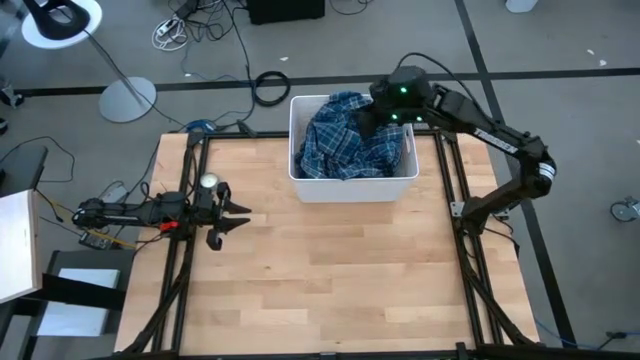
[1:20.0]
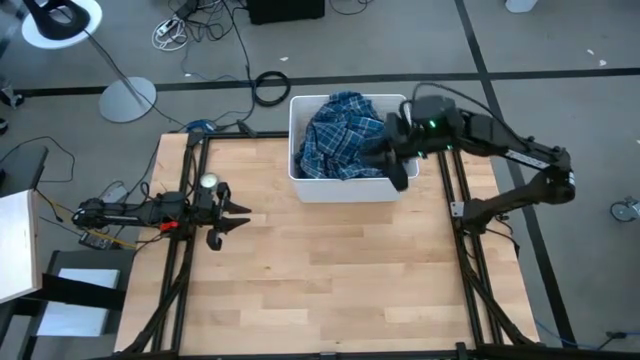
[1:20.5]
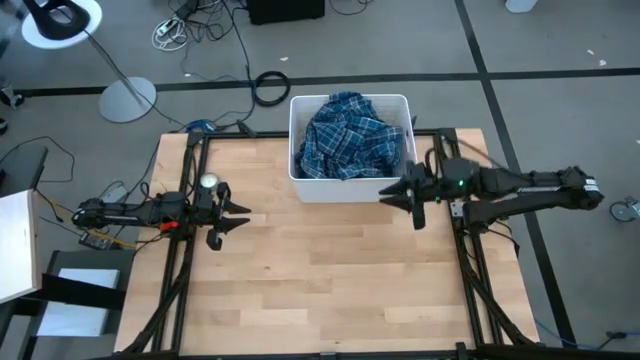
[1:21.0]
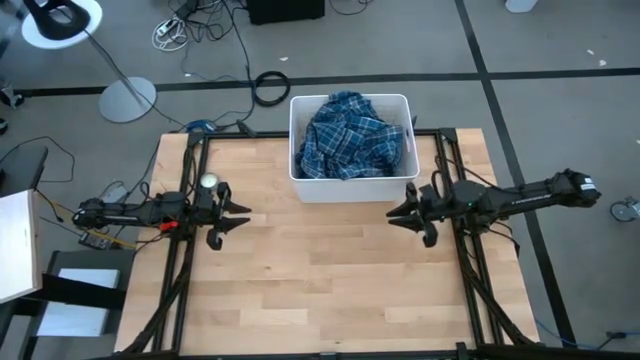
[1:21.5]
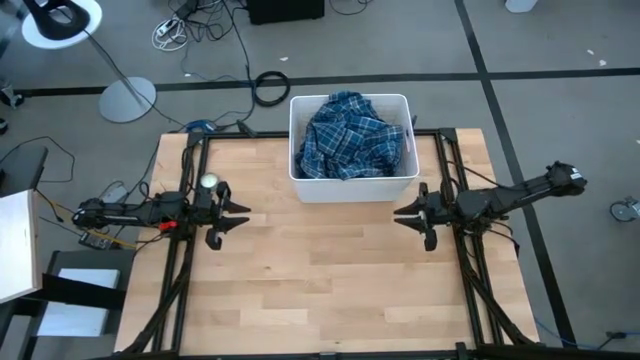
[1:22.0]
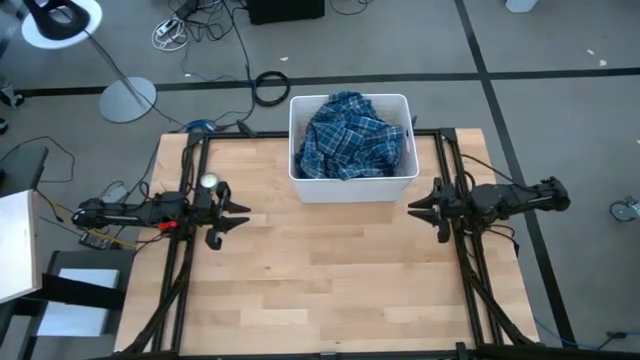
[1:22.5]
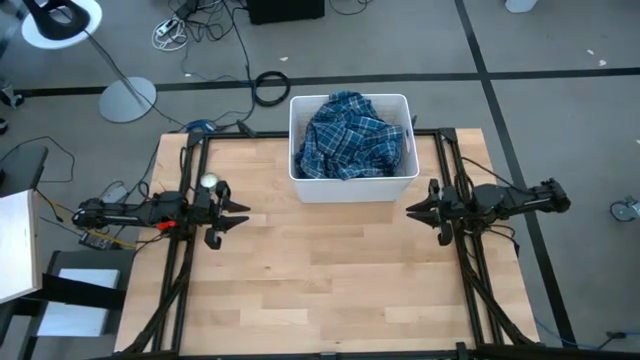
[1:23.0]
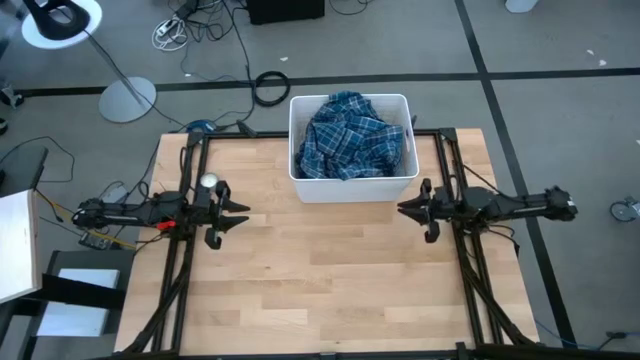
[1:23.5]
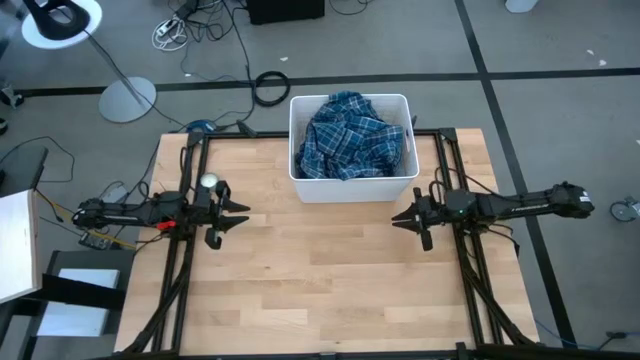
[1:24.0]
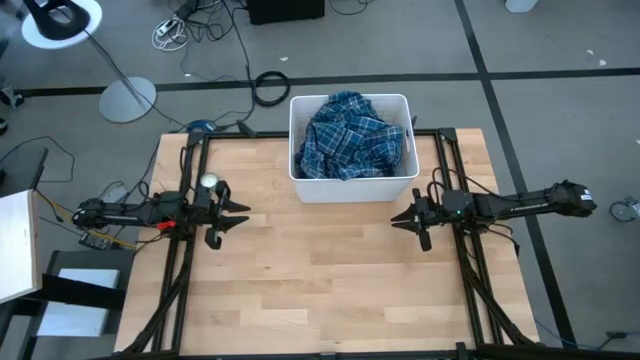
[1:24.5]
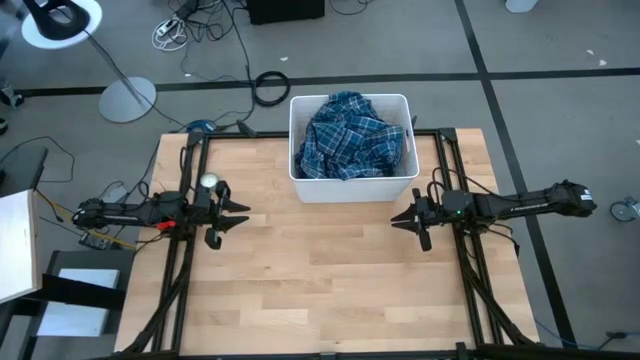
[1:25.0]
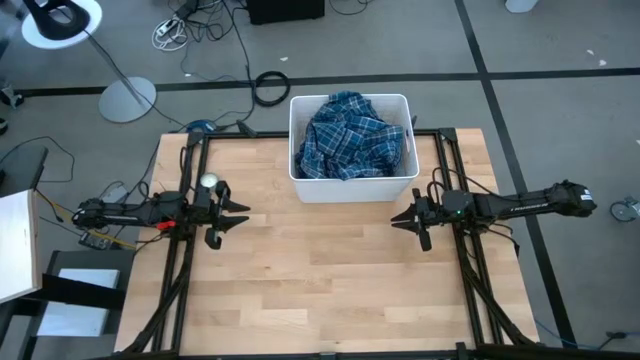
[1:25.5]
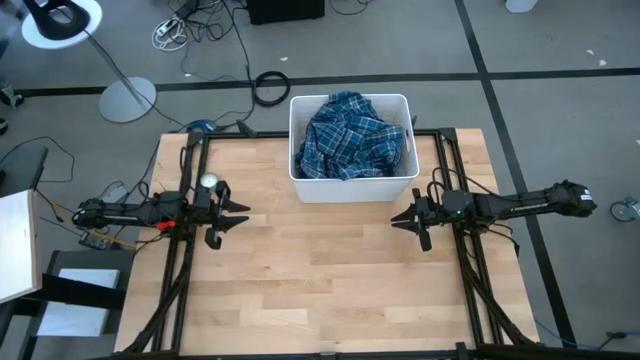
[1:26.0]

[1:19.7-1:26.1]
Task: Sort clothes
Return to Home Position

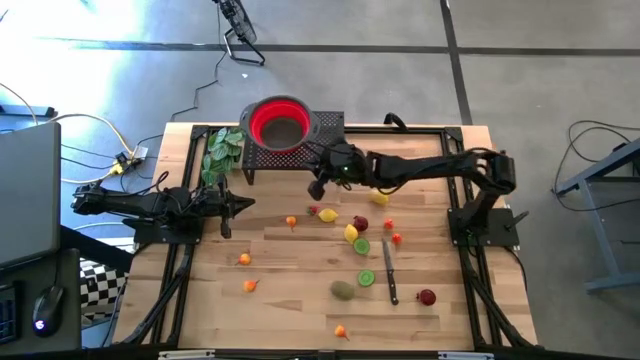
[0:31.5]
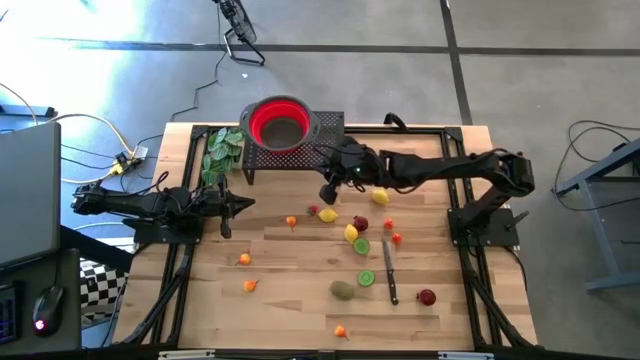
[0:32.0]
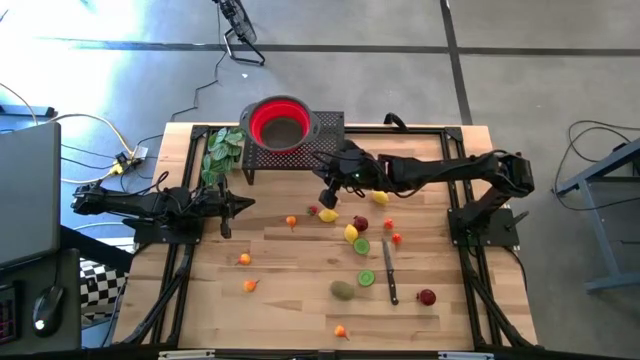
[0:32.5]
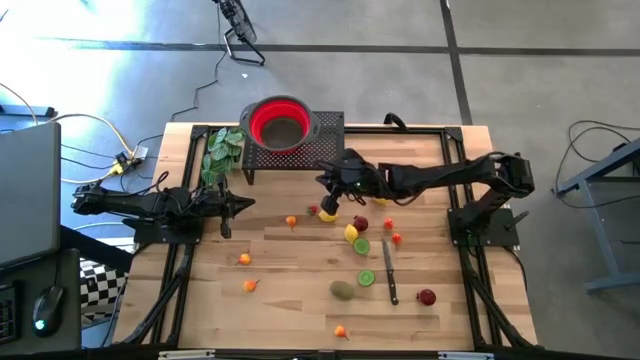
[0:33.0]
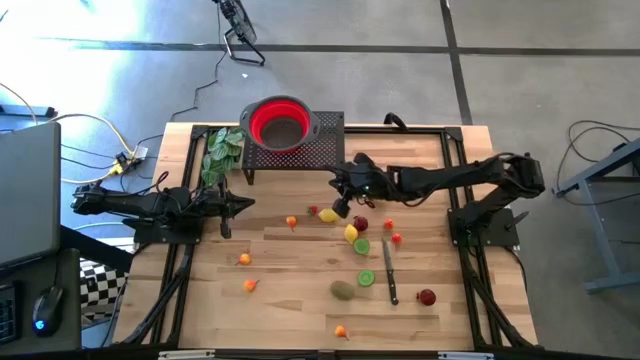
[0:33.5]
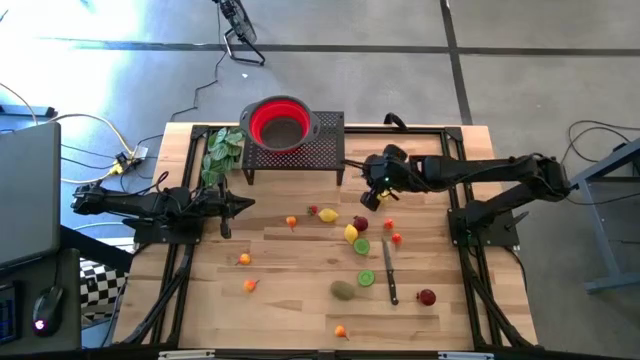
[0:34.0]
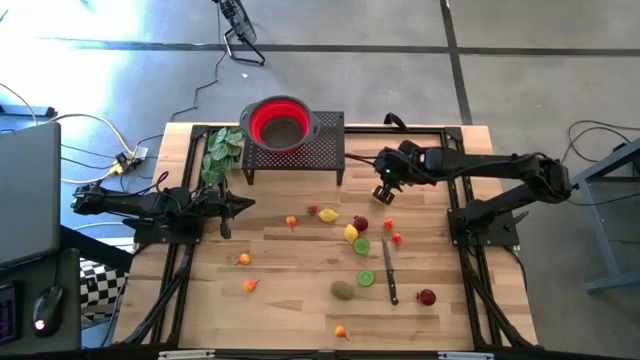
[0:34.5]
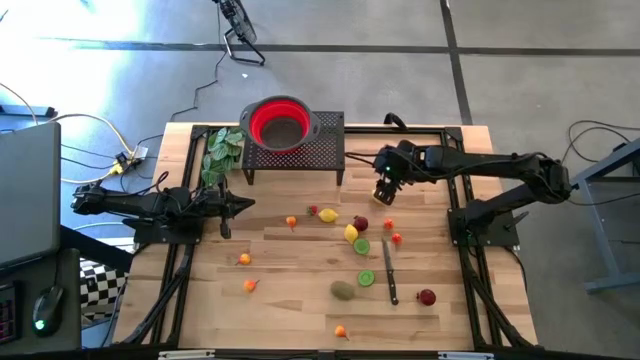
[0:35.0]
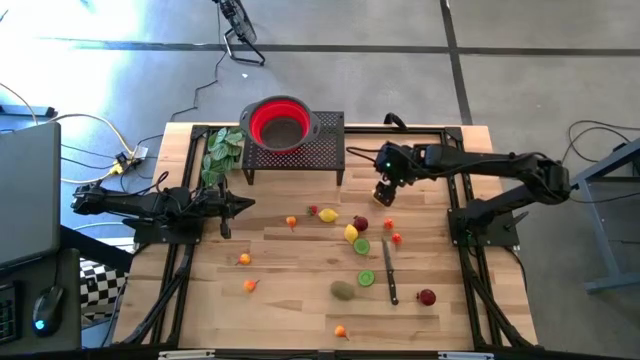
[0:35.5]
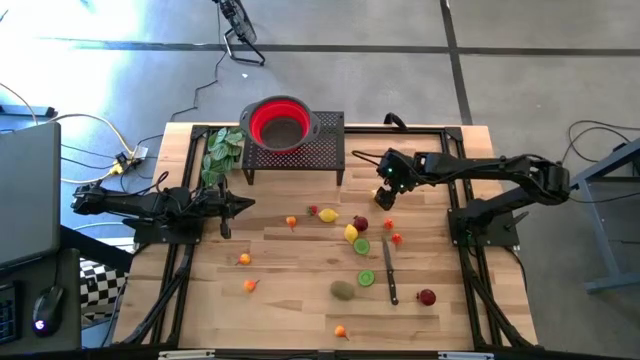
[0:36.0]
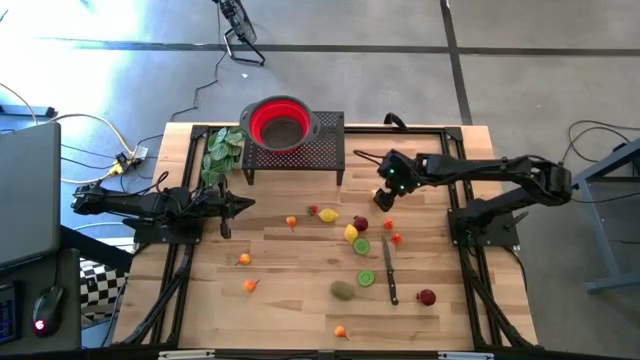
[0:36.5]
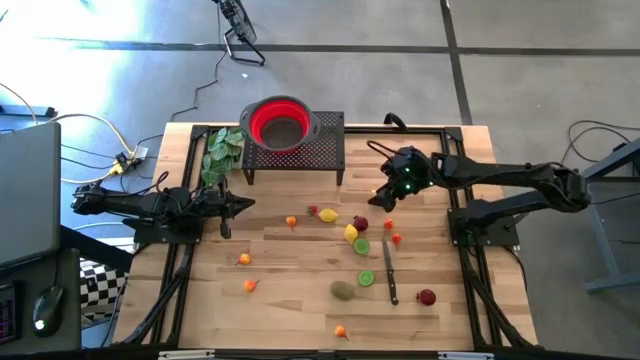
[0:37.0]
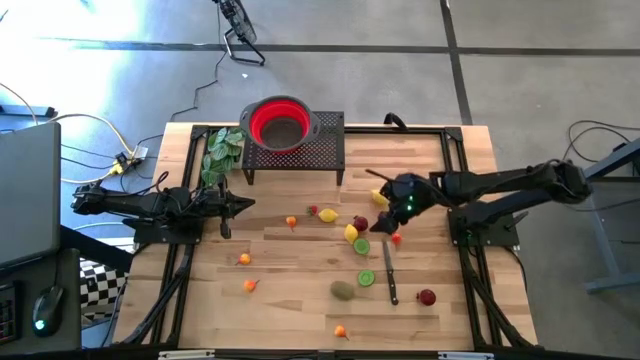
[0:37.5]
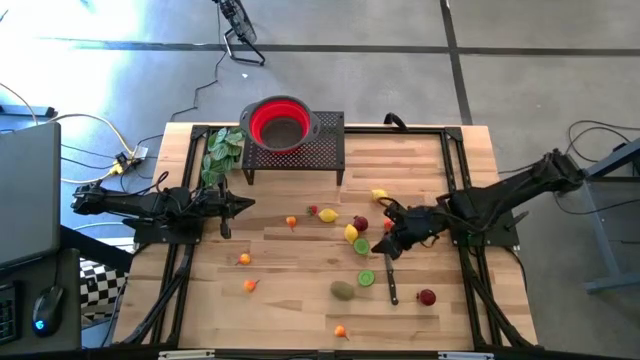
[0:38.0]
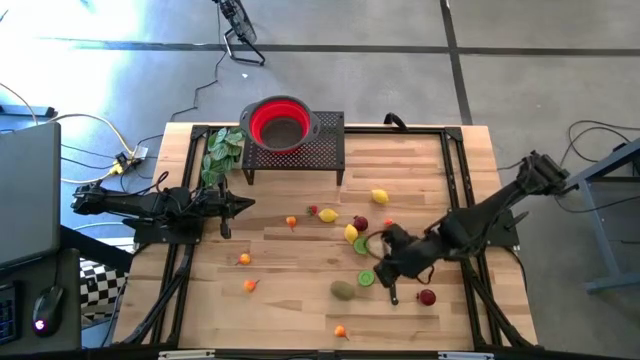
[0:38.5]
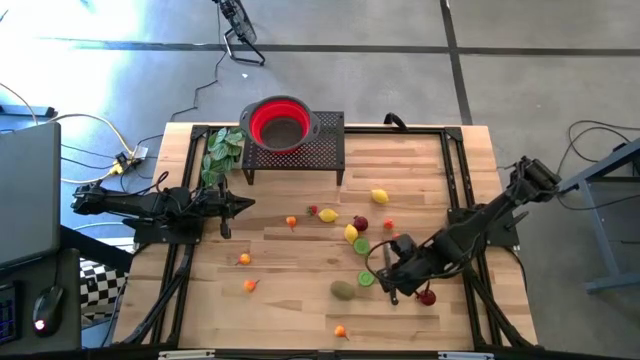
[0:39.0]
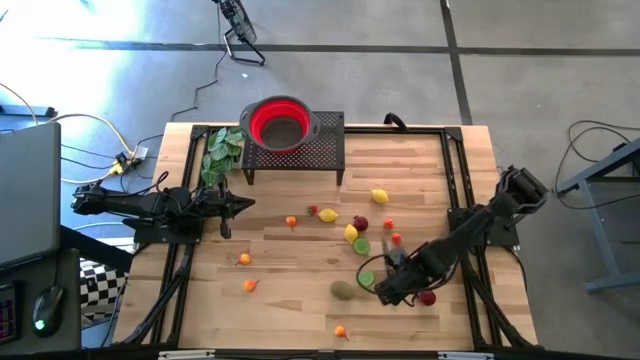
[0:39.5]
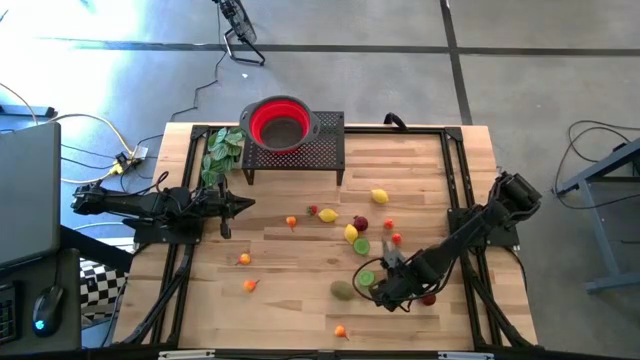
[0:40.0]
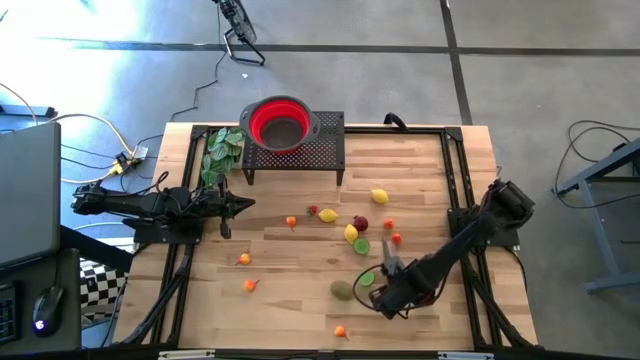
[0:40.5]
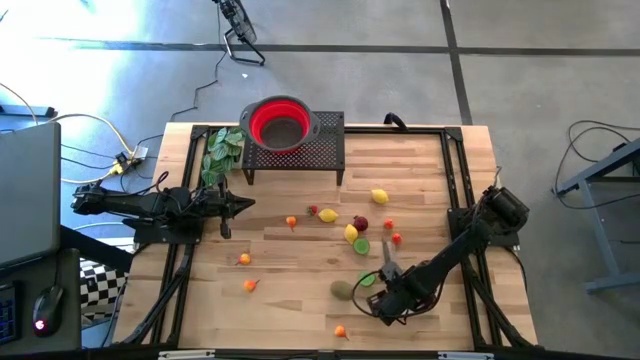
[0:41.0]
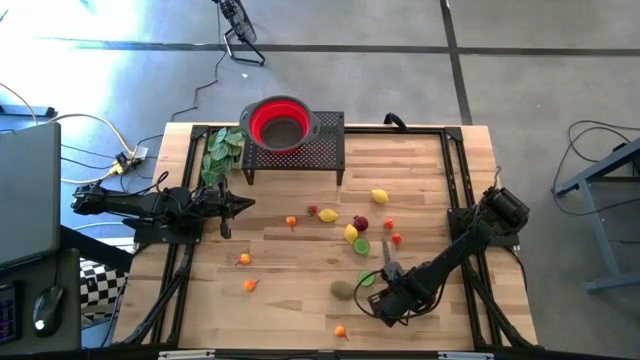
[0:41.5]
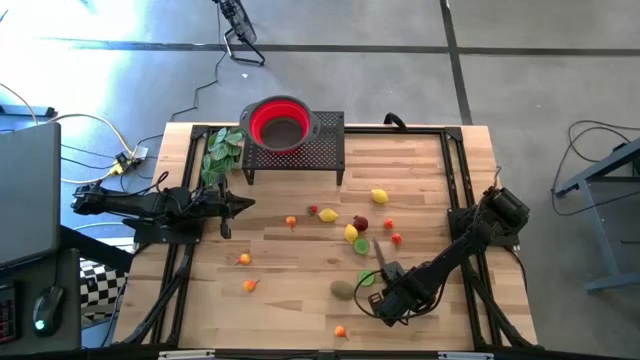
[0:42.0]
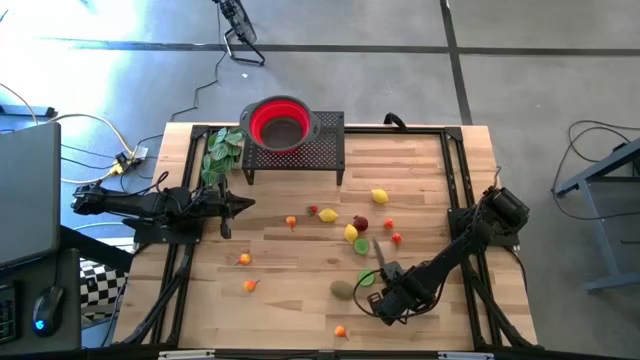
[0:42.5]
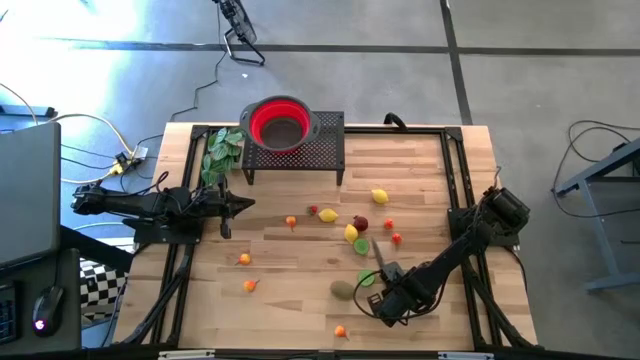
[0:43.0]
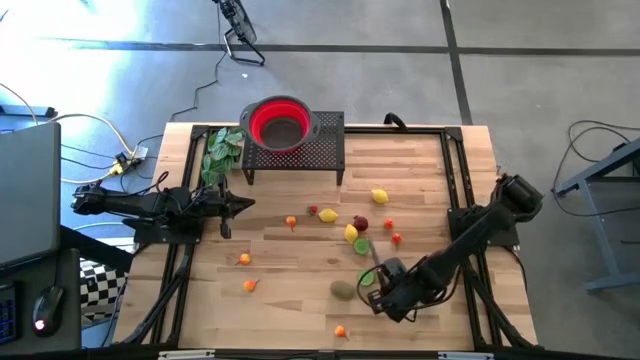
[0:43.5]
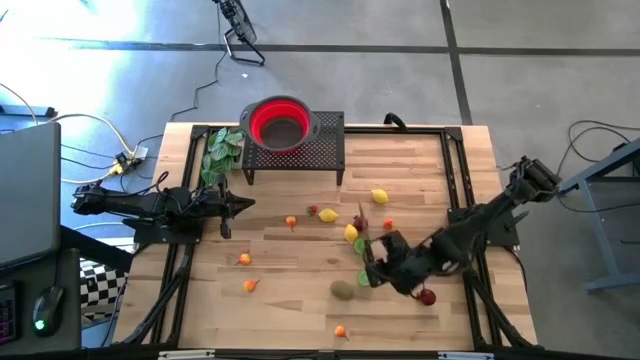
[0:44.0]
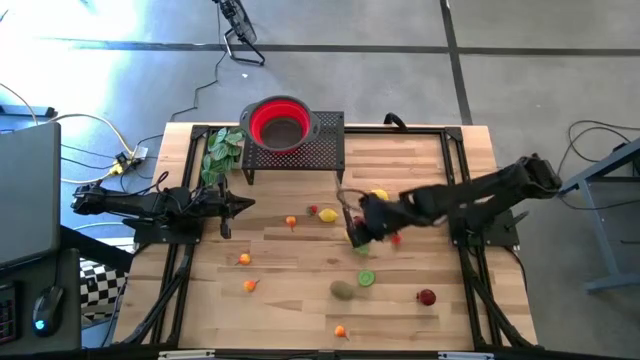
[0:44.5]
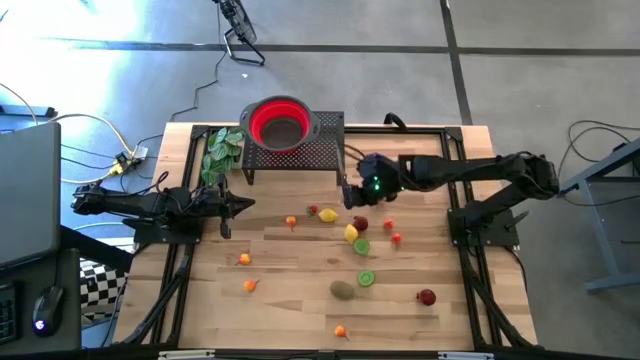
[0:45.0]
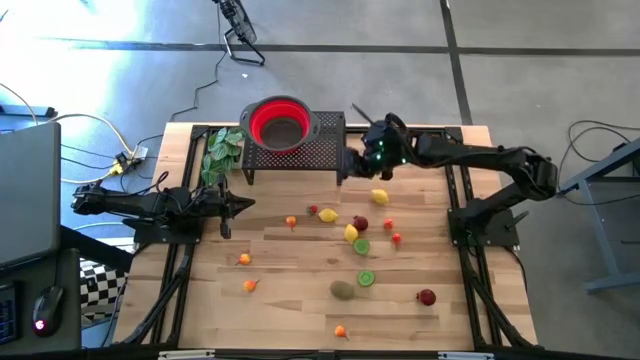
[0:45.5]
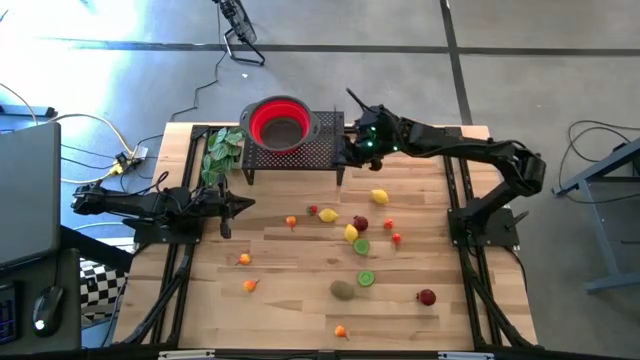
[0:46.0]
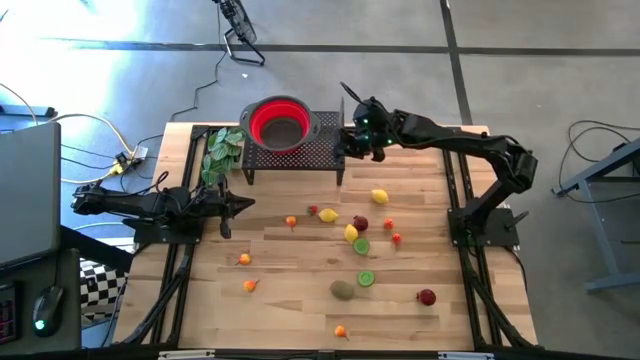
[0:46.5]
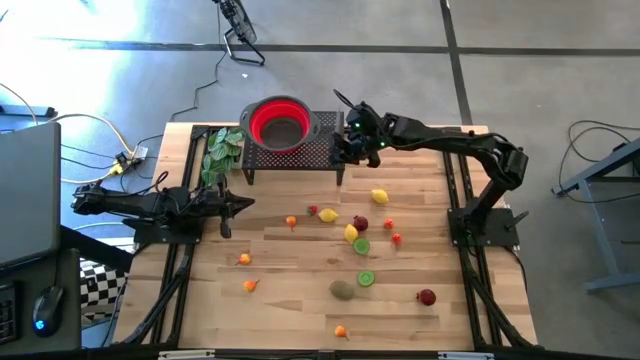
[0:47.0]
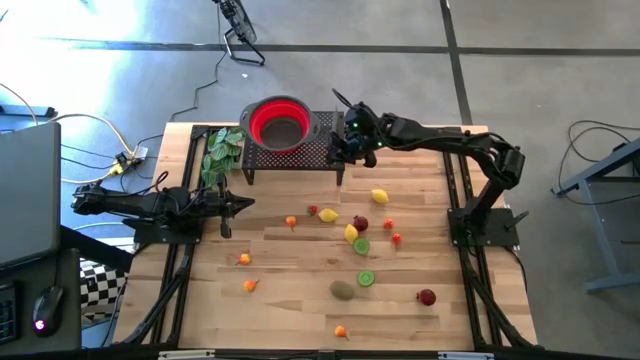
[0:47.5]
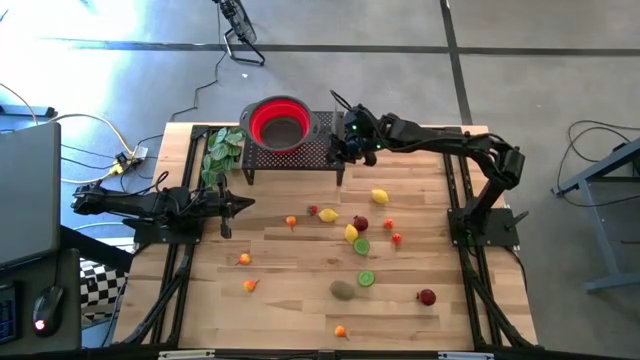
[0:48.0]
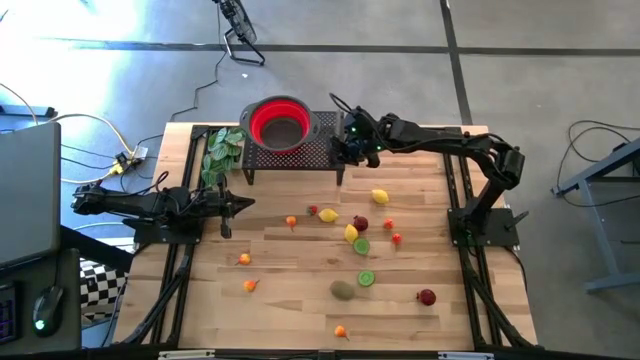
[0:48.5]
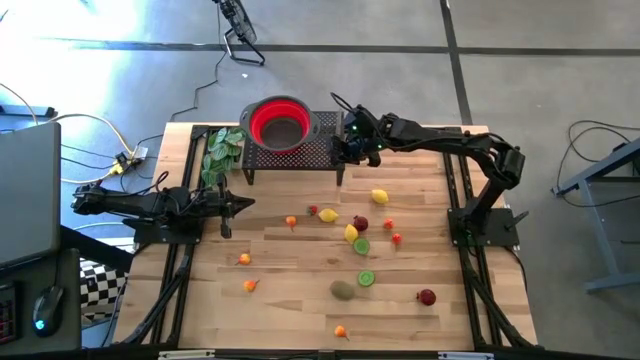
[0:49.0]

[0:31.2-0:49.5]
Task: Pick & Place Fruit
Put the black knife on the shelf
